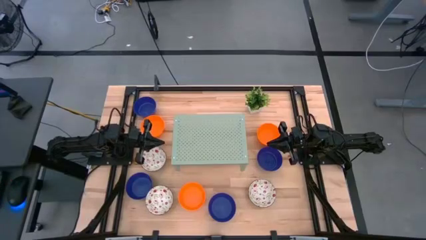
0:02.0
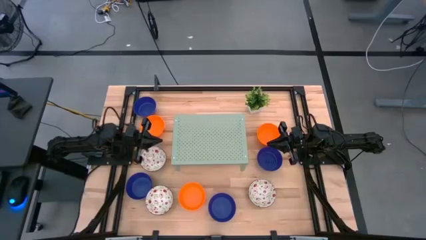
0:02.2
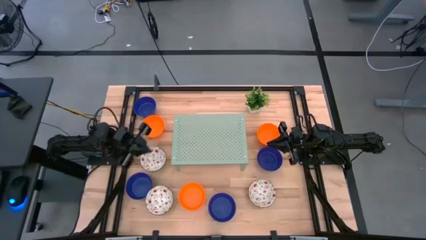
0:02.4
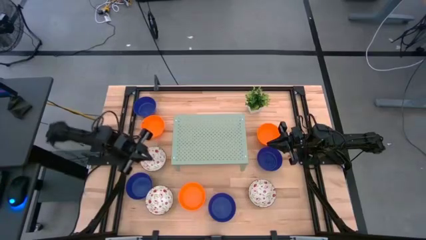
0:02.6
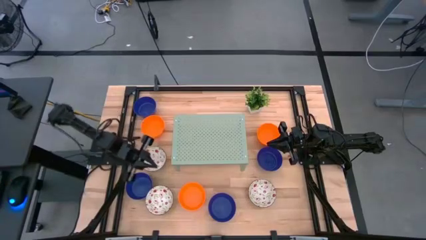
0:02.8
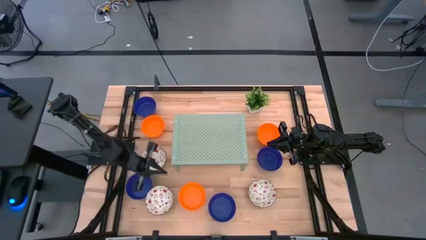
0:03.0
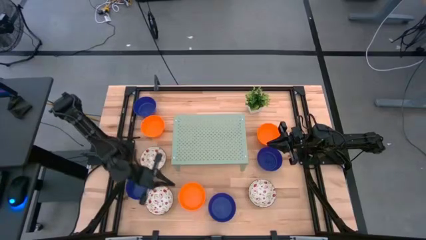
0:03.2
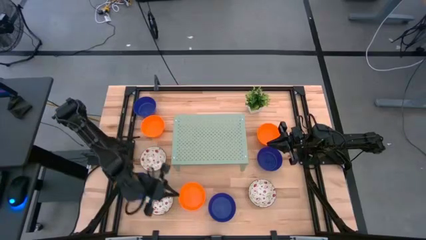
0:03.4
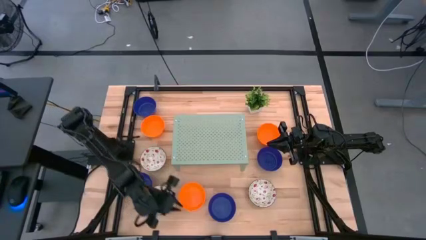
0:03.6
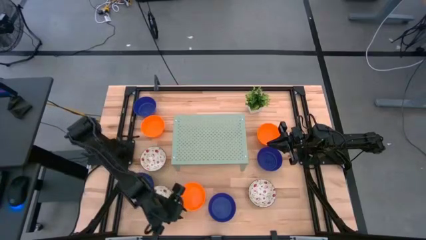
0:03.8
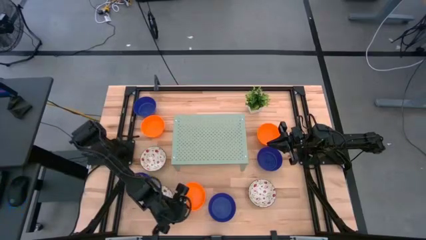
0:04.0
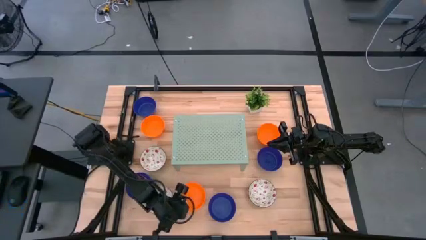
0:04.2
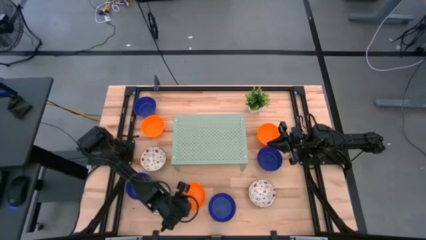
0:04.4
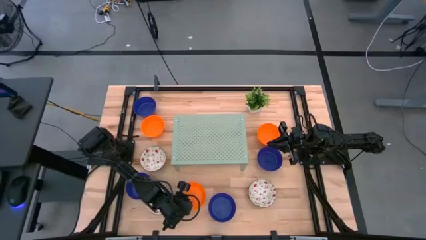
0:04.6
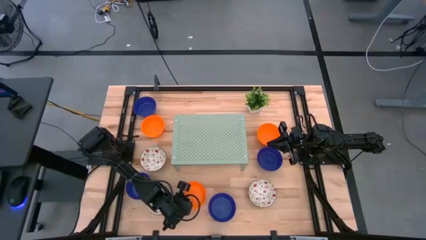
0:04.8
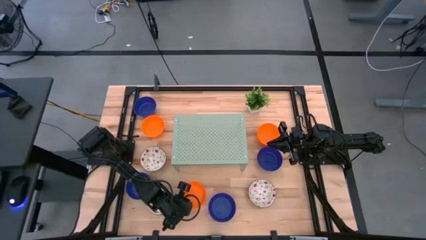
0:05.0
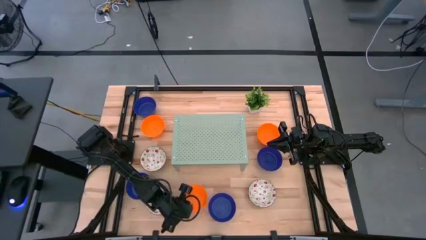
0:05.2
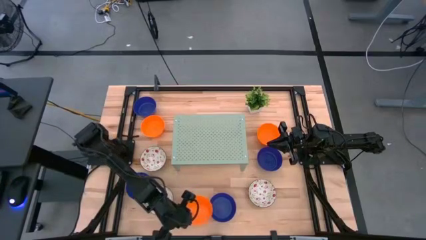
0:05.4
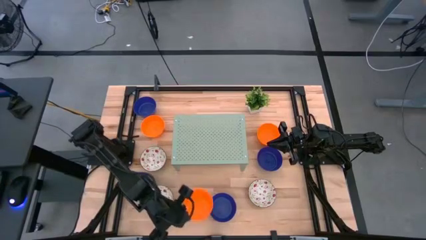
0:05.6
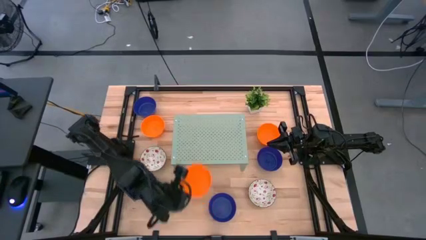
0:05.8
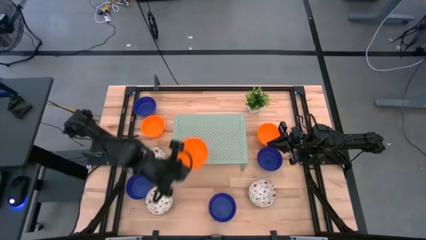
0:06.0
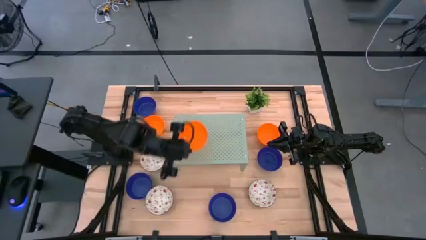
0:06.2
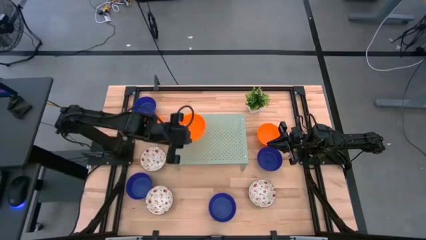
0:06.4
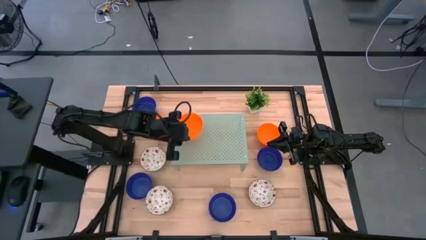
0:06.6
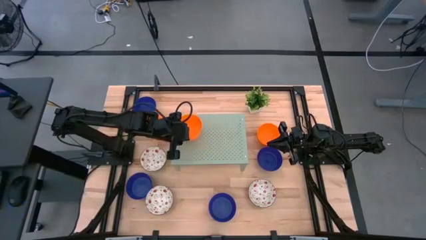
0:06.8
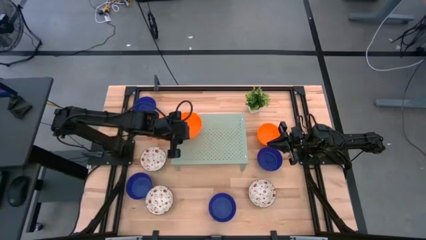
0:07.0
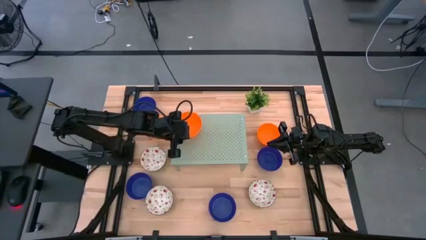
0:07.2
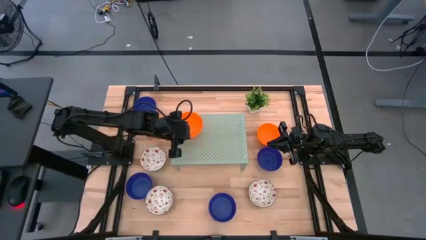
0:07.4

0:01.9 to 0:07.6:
Task: Pick & Place Mini bowls
Put the orange bowl on the shelf

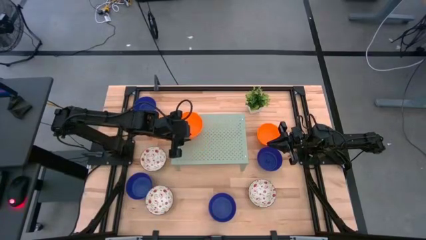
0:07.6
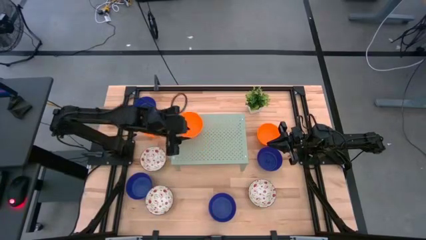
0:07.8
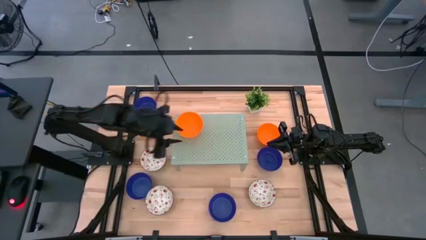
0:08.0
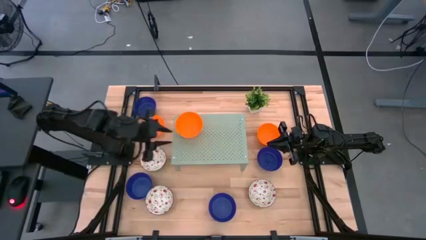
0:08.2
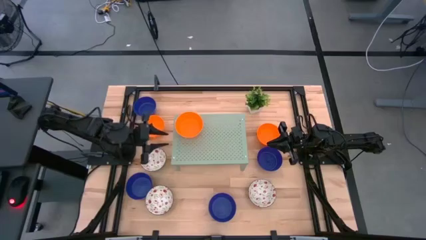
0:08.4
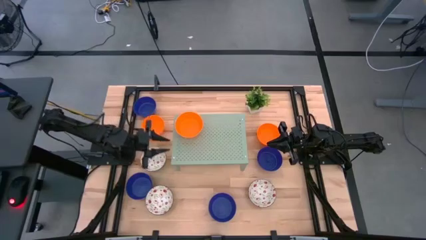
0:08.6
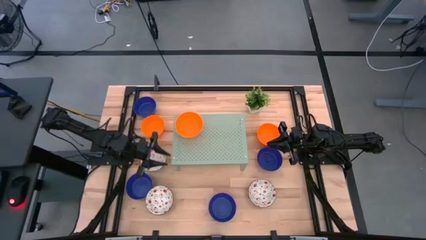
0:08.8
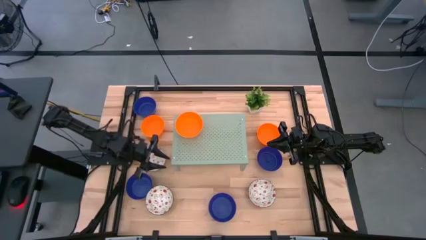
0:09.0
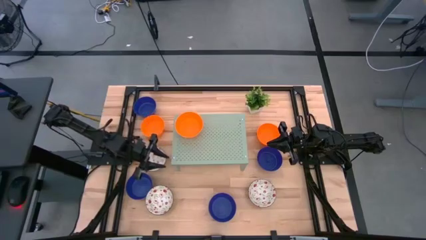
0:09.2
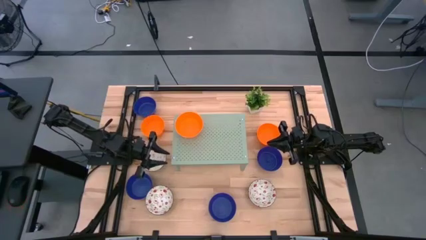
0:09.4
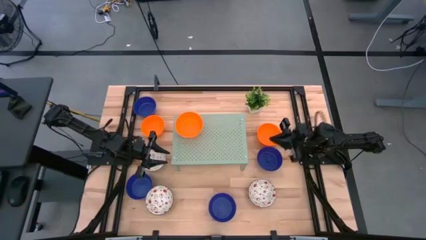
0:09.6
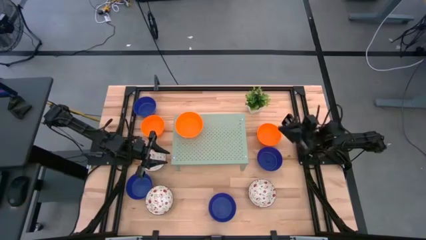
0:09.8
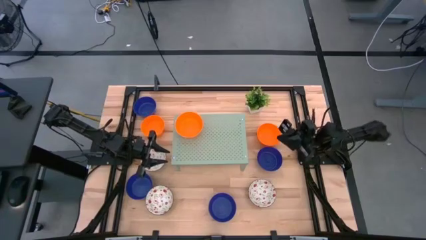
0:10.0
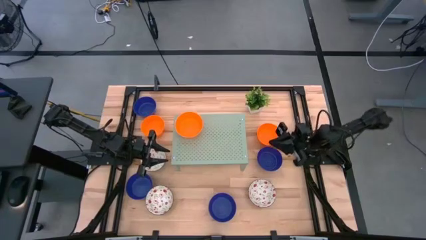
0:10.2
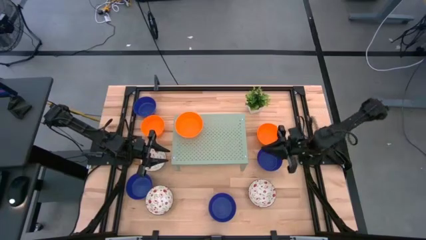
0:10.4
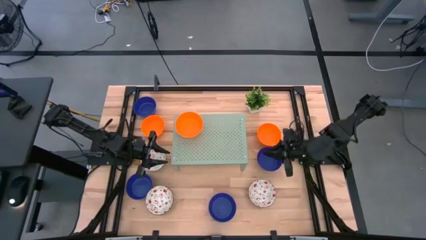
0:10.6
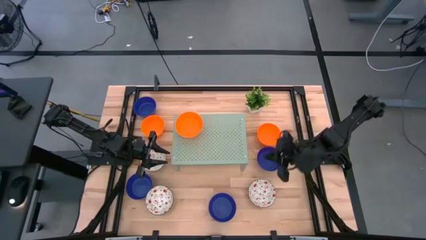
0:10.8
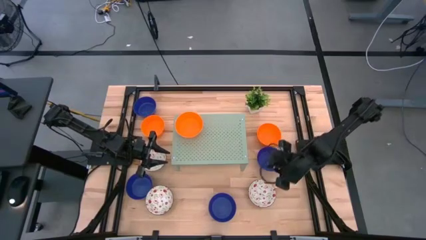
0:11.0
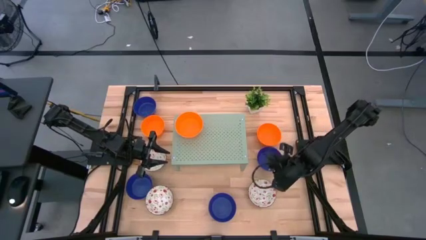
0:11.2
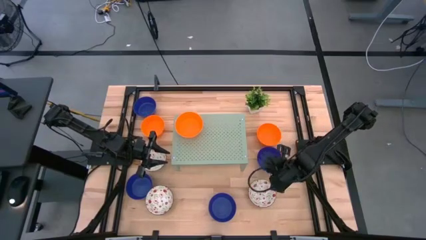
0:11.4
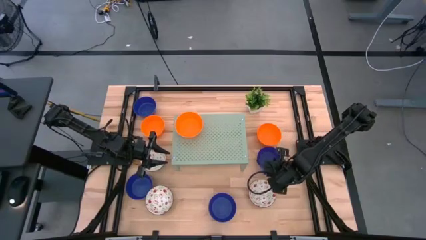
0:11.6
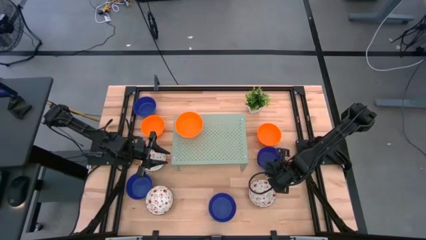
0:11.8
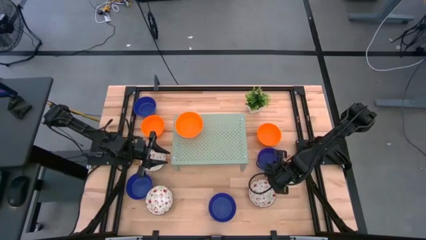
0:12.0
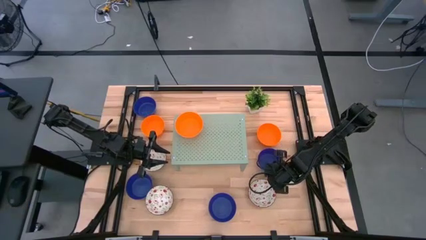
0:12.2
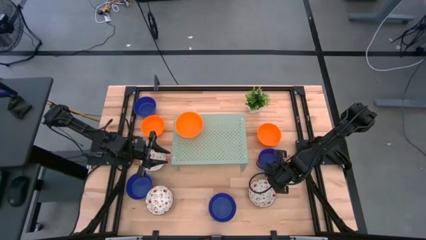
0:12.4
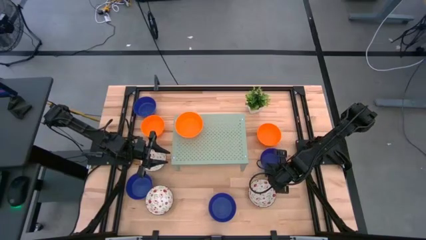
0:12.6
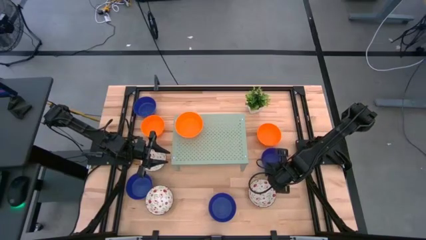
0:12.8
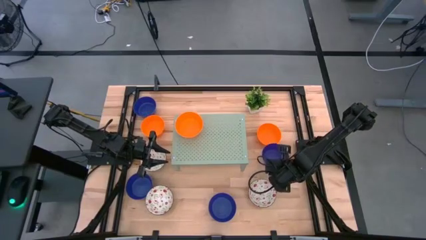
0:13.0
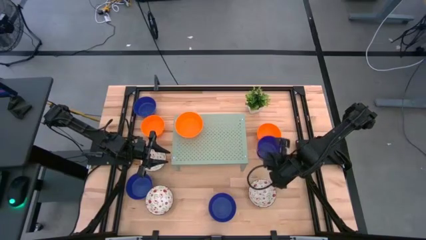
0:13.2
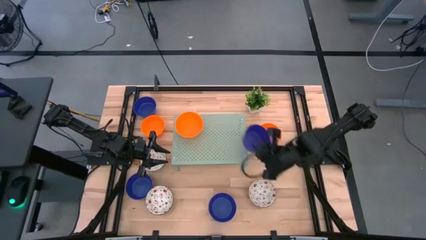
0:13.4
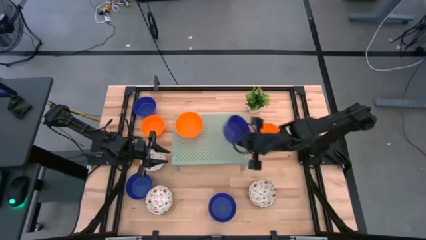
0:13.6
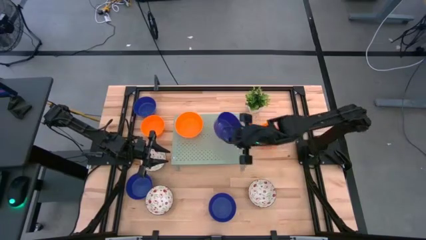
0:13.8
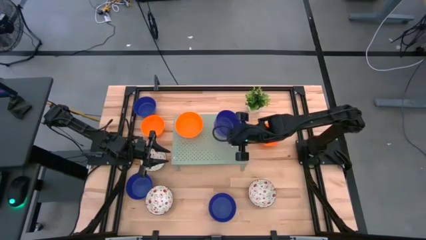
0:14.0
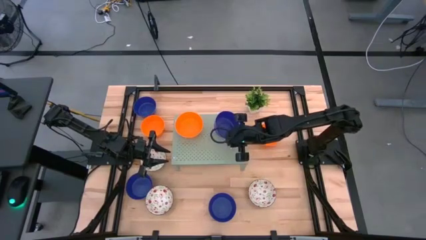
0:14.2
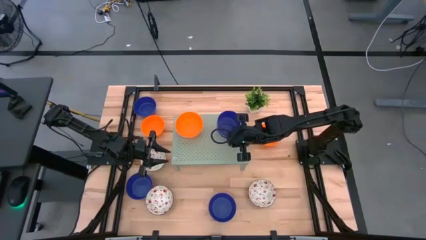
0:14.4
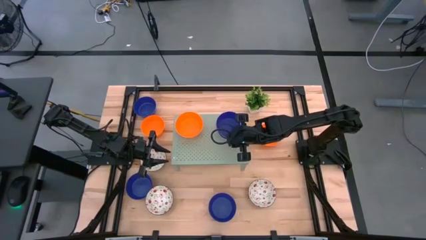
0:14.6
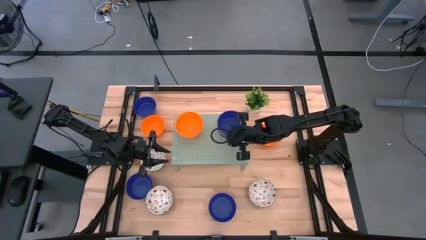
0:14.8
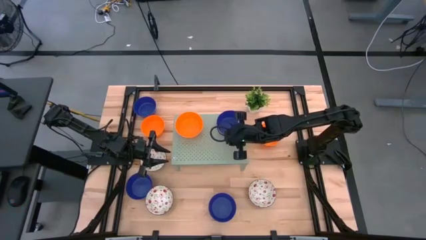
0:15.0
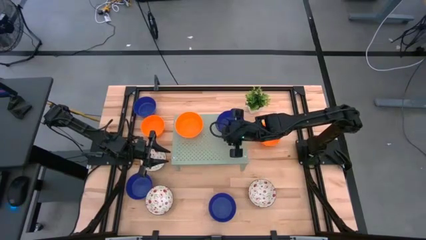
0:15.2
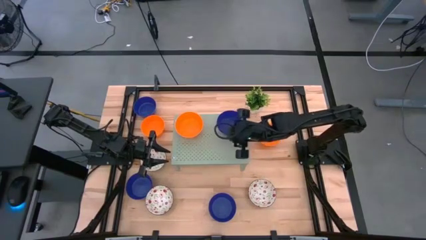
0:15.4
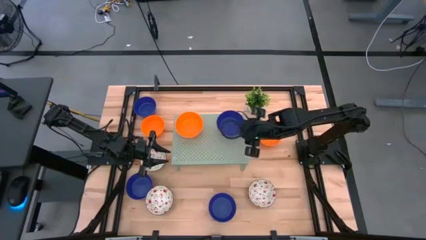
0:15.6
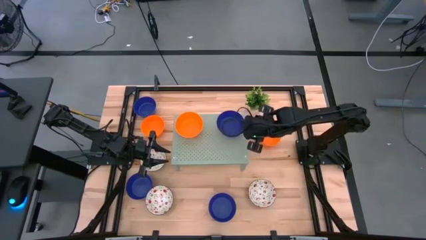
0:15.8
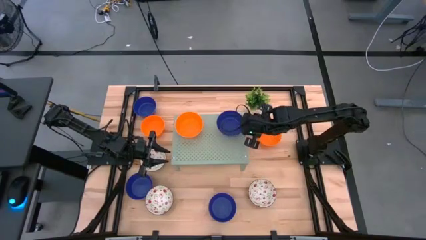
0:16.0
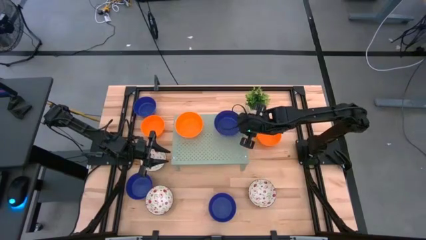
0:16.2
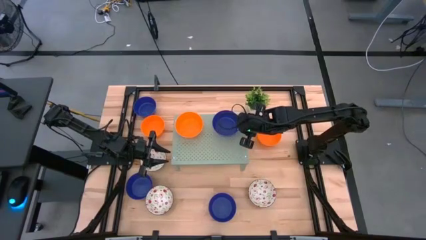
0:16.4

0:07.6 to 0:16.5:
Put the blue bowl on the shelf

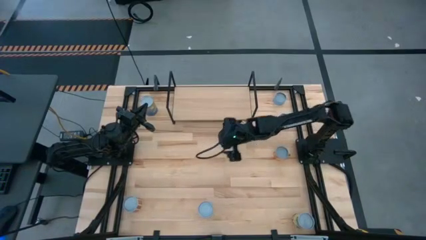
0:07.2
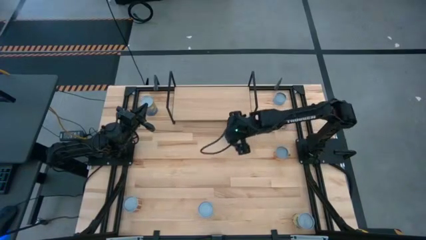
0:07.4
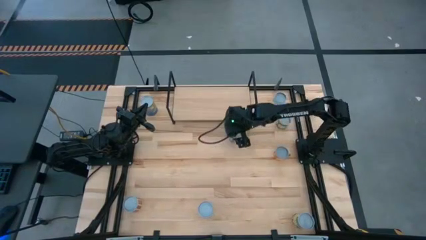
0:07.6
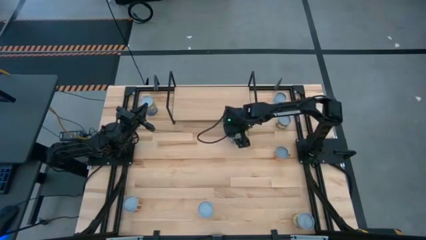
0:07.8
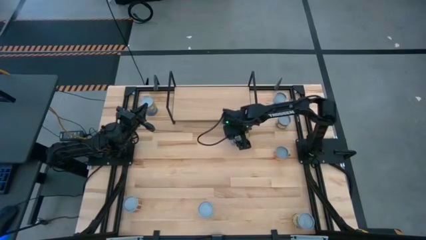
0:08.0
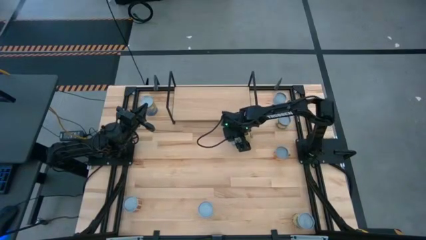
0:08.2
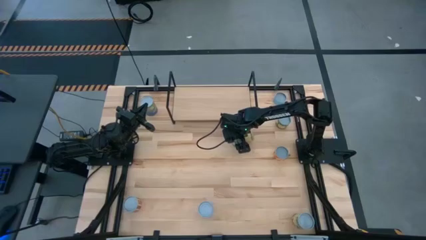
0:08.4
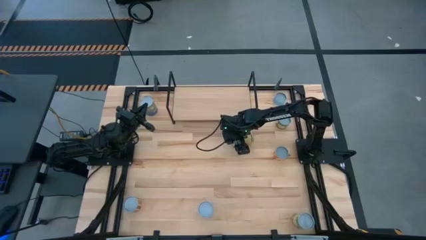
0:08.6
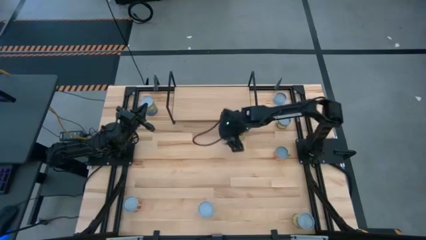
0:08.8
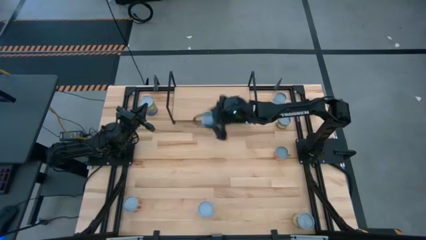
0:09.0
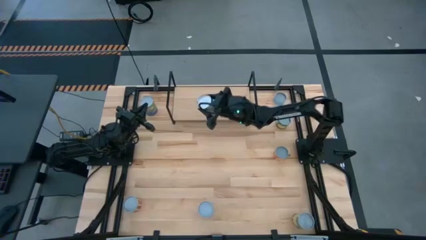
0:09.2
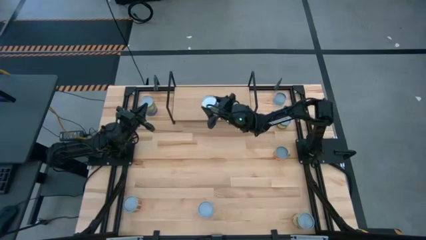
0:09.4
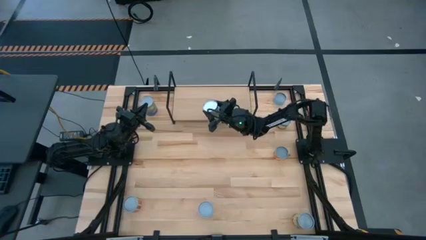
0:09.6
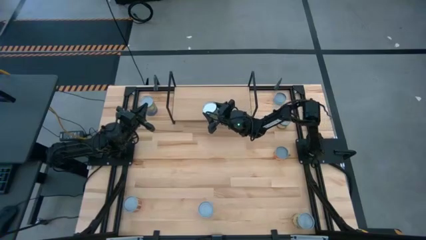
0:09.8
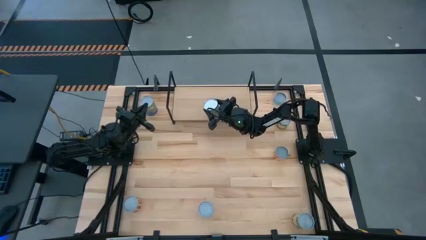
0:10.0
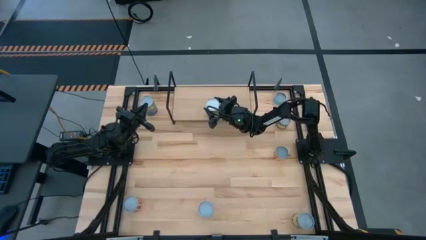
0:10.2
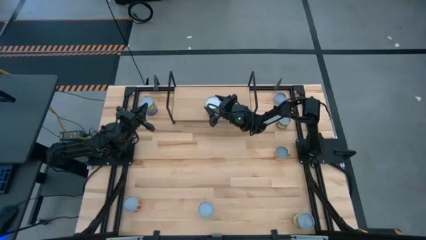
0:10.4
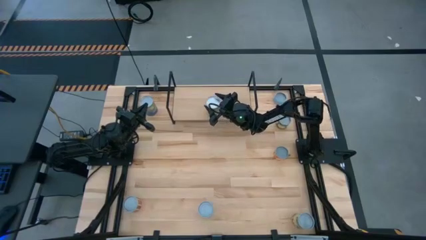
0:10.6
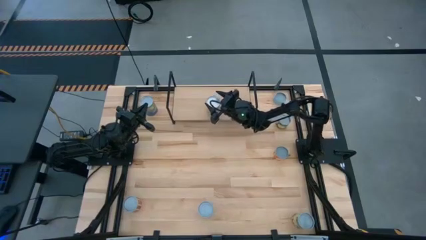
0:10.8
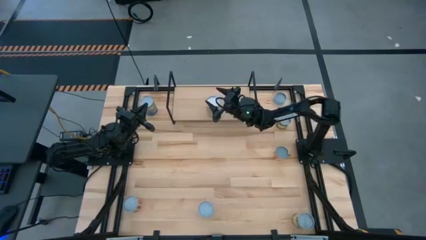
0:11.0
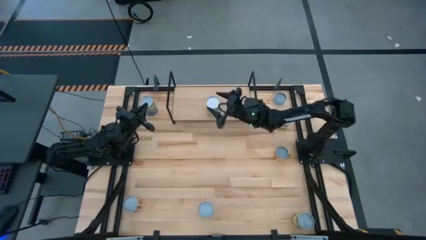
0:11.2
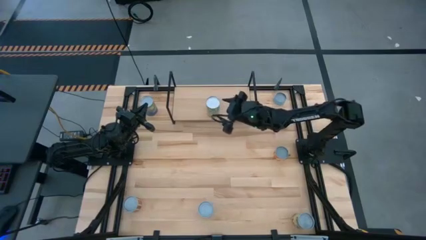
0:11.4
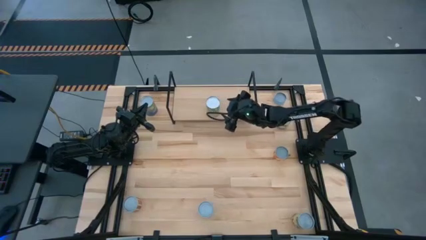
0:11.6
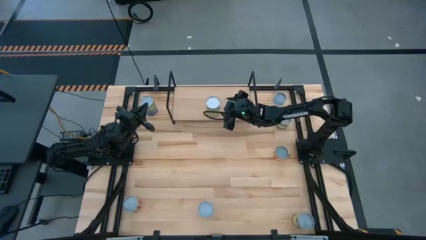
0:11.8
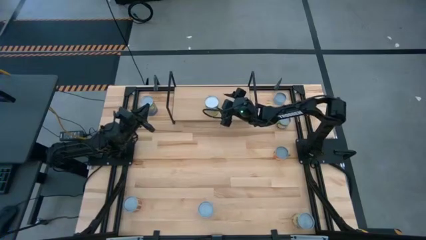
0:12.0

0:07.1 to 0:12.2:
Task: Pick and place cans onto a shelf
Put the canned carrots on the shelf
